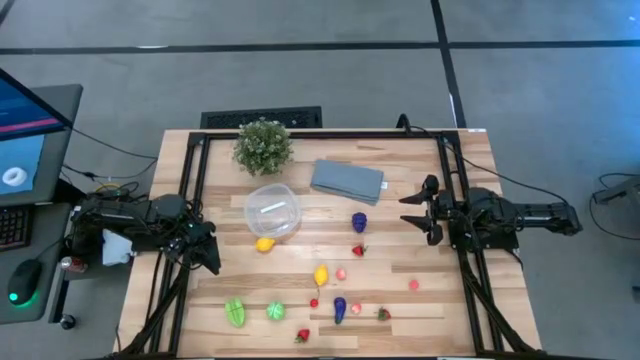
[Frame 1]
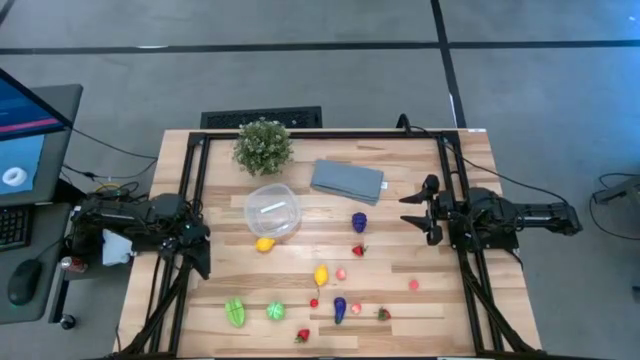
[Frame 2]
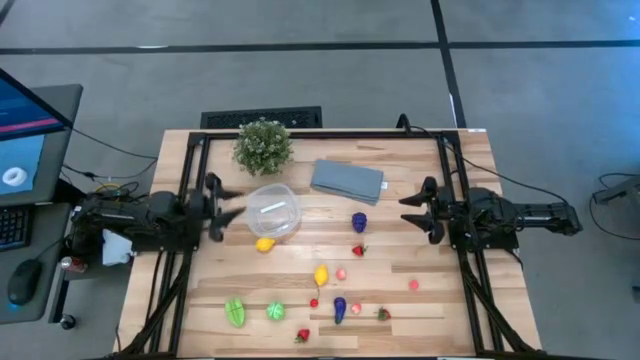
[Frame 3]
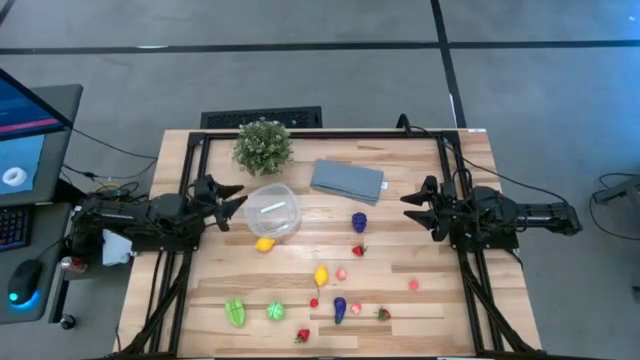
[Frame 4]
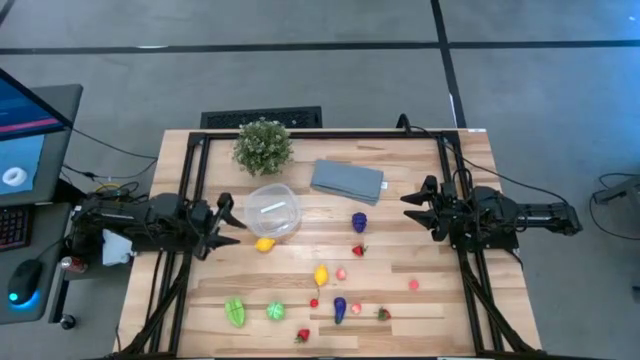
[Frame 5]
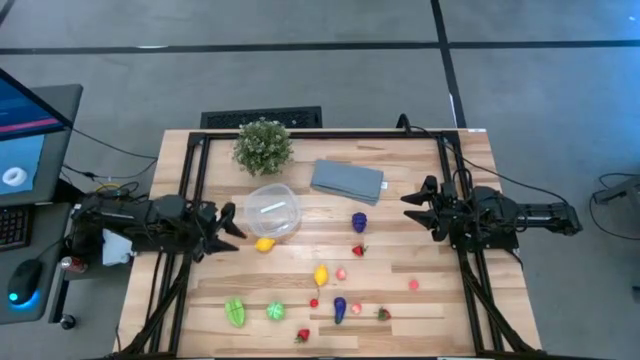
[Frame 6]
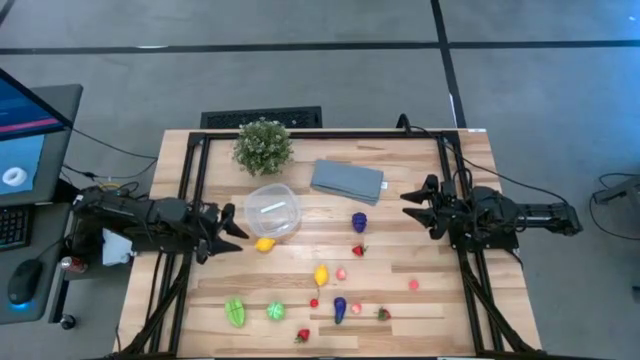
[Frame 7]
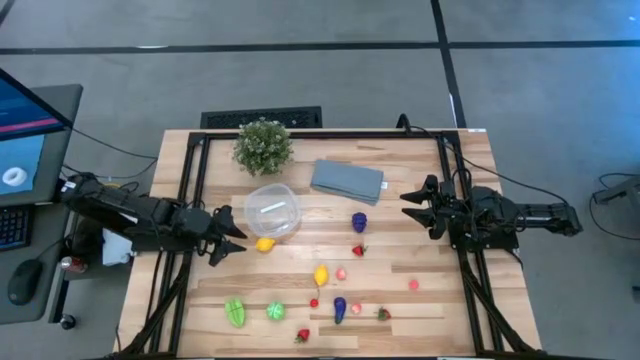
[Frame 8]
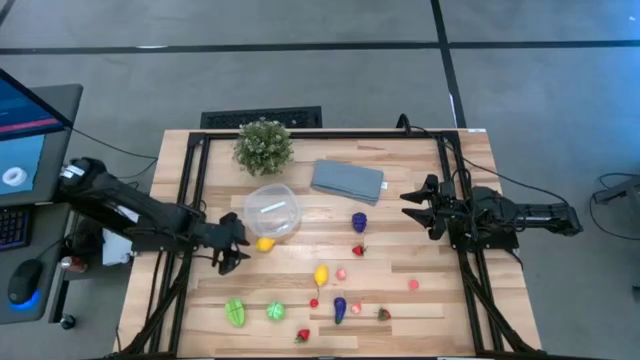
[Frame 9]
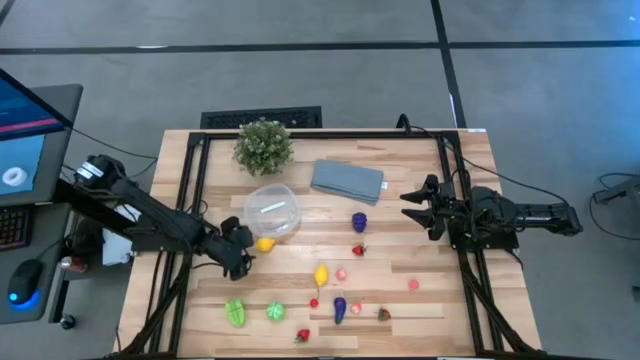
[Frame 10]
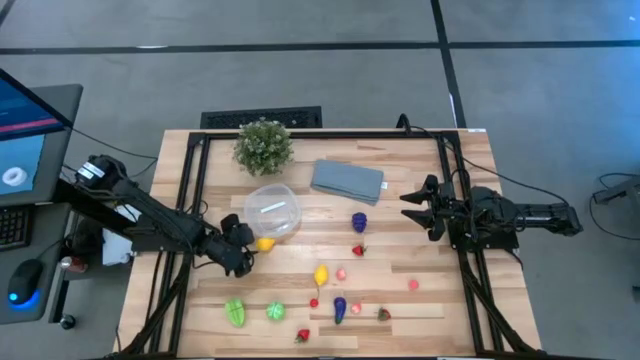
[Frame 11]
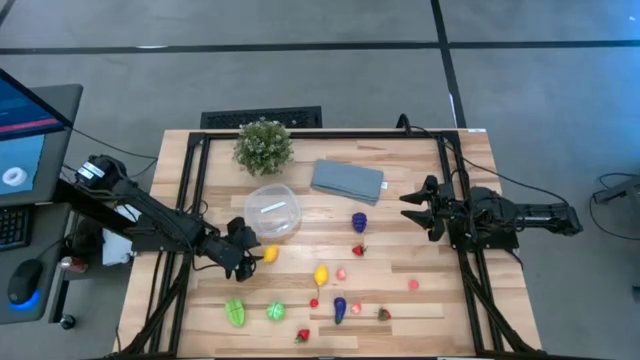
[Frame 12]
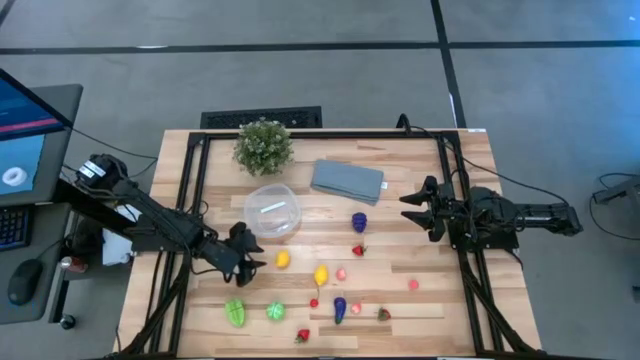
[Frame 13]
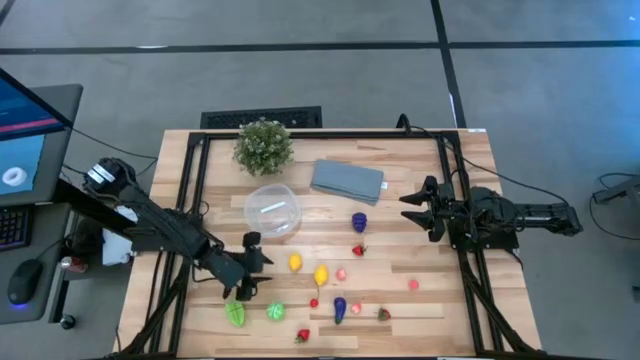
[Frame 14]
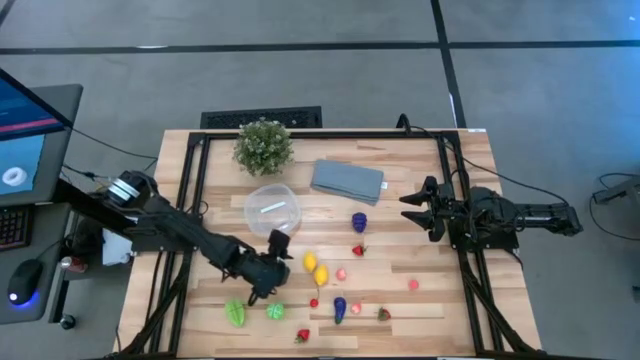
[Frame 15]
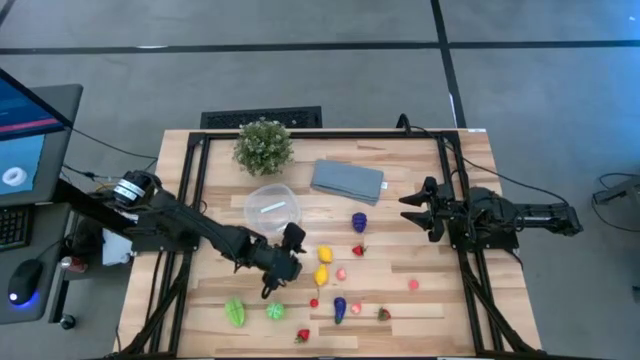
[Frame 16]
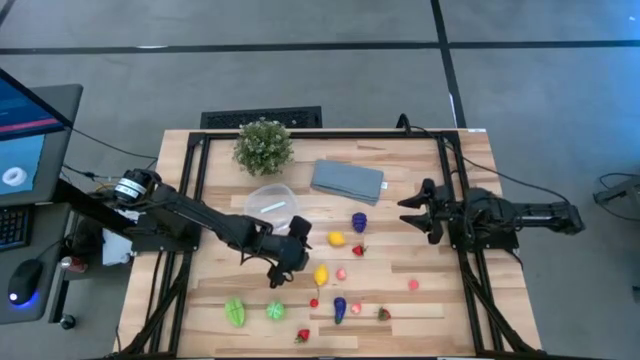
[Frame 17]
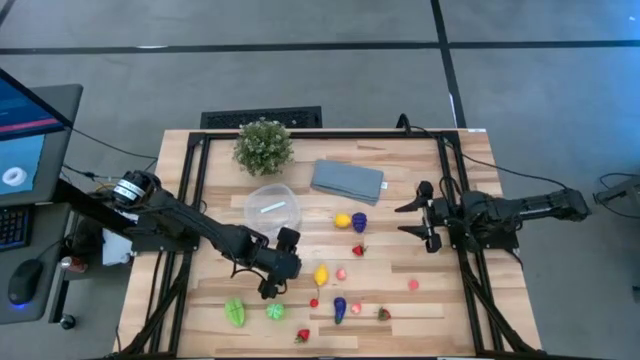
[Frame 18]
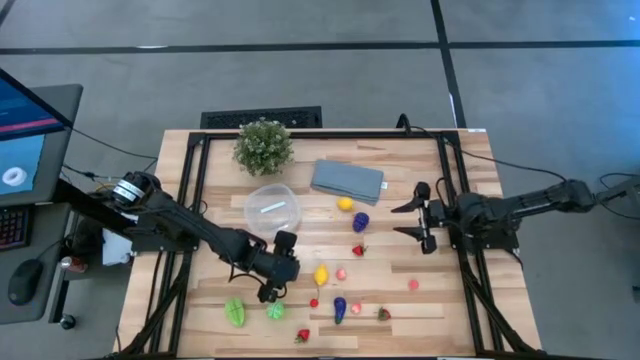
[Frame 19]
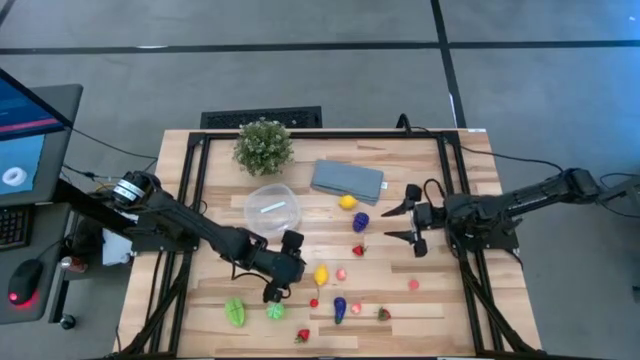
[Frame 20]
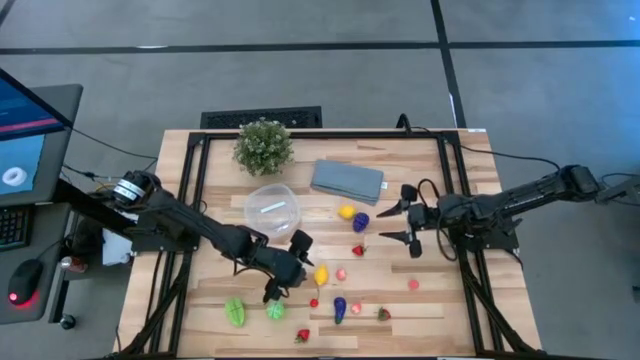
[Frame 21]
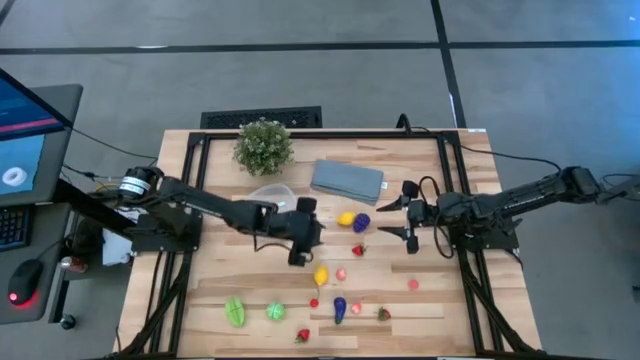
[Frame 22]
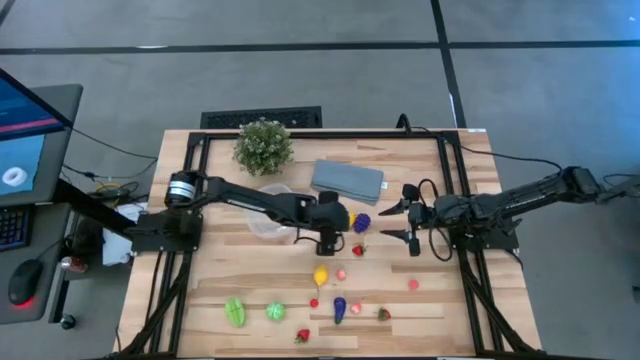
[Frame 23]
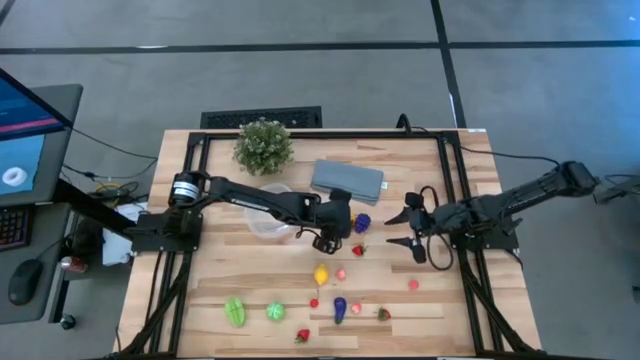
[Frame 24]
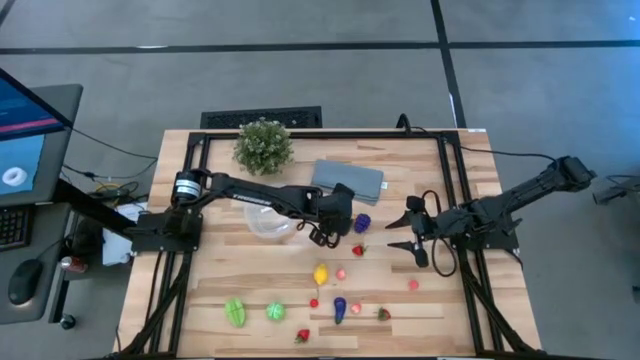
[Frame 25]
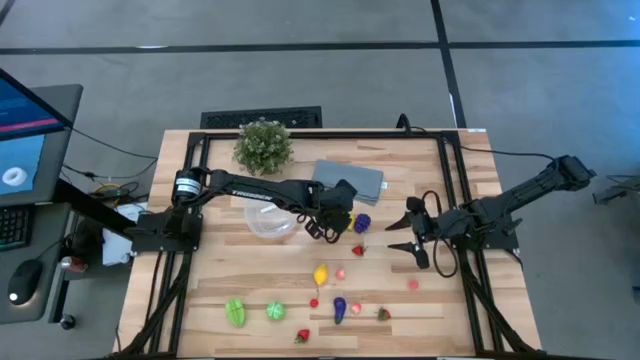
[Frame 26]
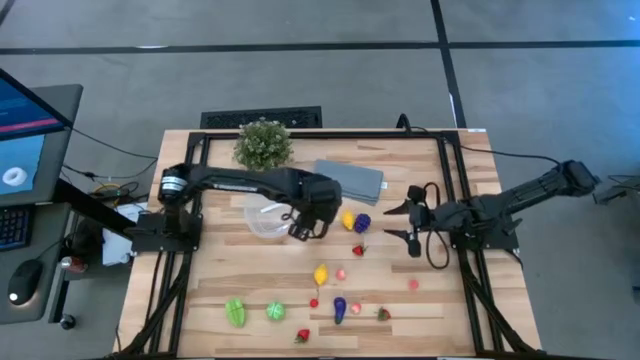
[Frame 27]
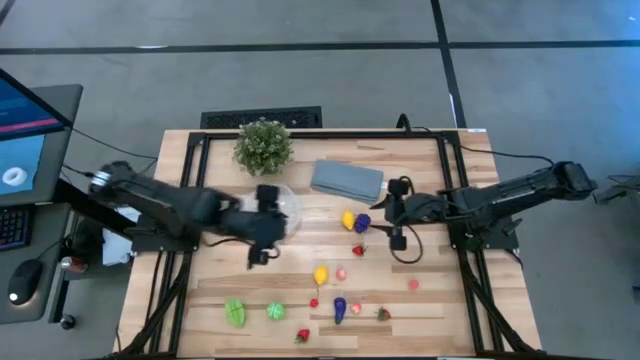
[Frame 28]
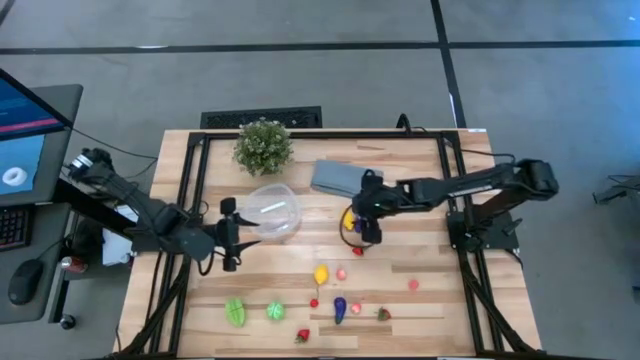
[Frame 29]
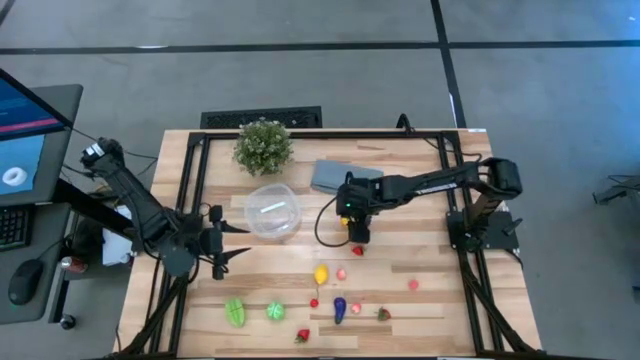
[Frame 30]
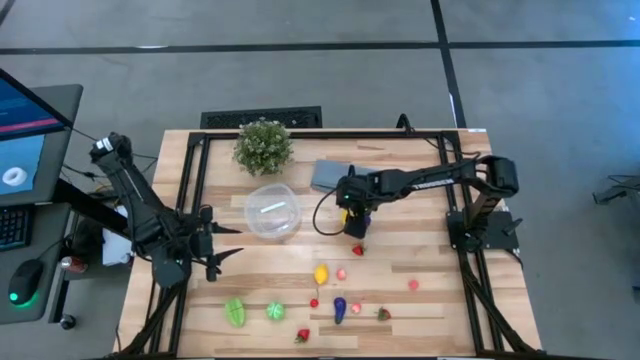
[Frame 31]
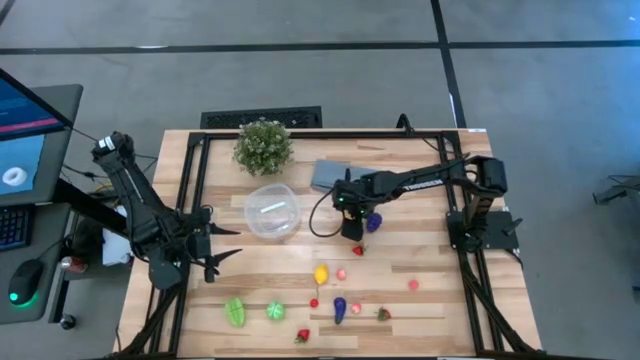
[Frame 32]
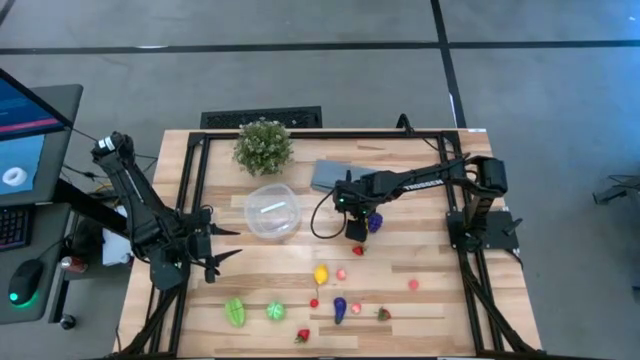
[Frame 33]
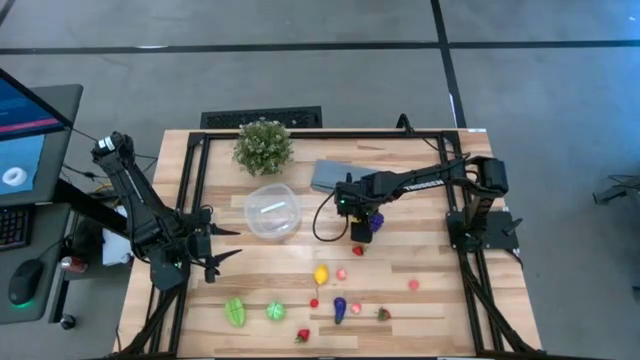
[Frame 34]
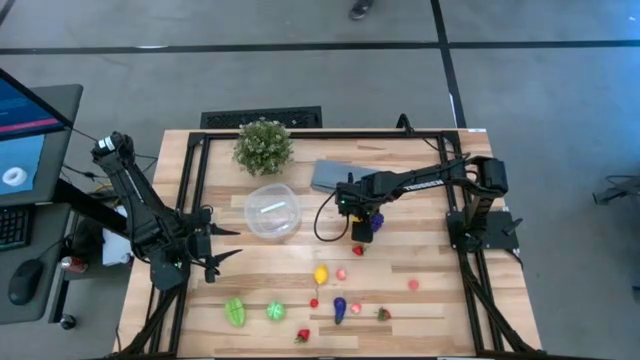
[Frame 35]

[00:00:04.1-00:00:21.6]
Task: Pick and placing Produce into tupperware
Put the left lemon into the transparent bin
